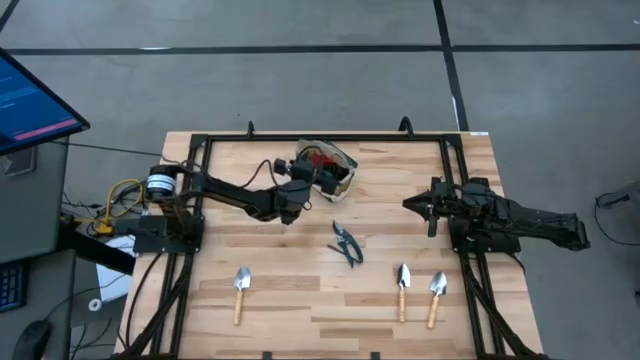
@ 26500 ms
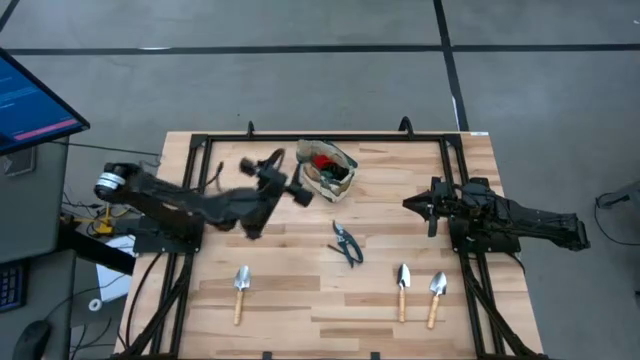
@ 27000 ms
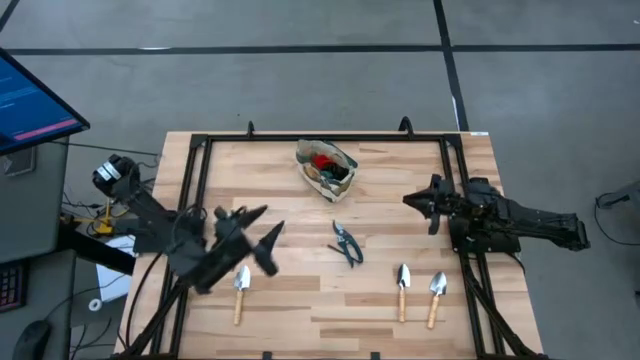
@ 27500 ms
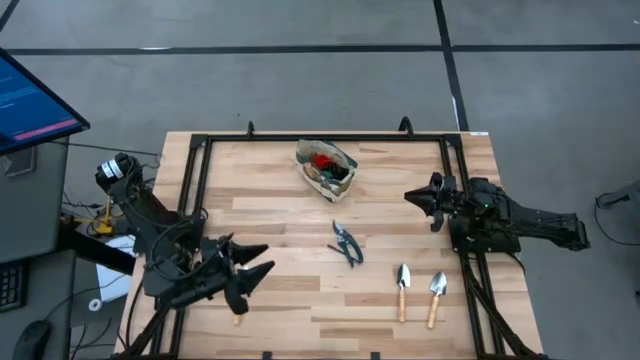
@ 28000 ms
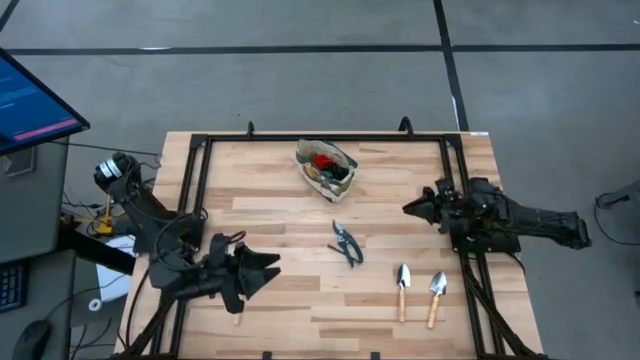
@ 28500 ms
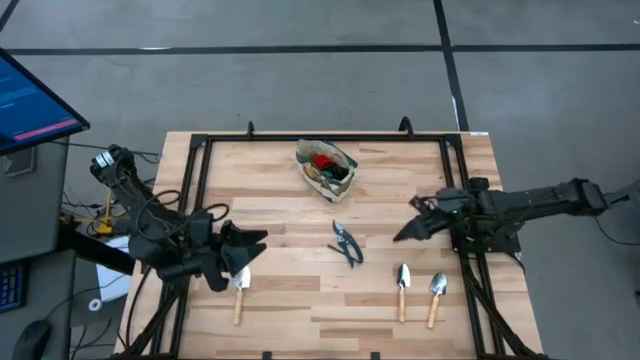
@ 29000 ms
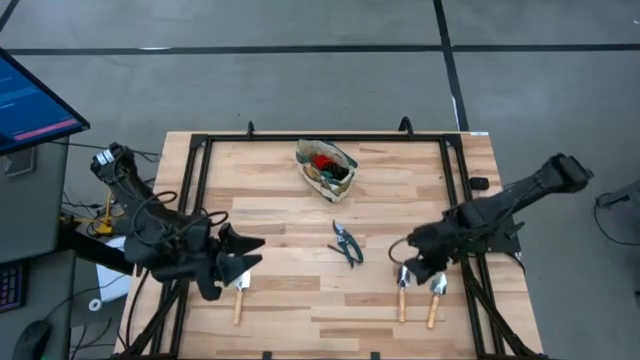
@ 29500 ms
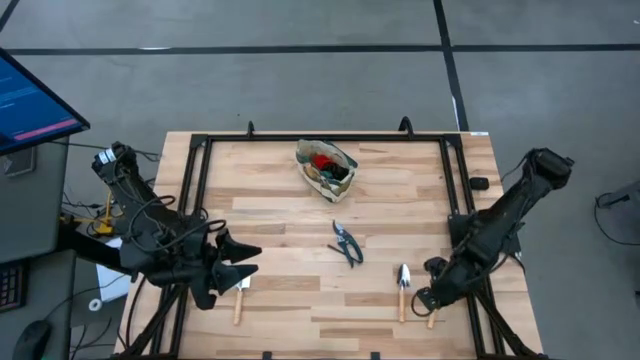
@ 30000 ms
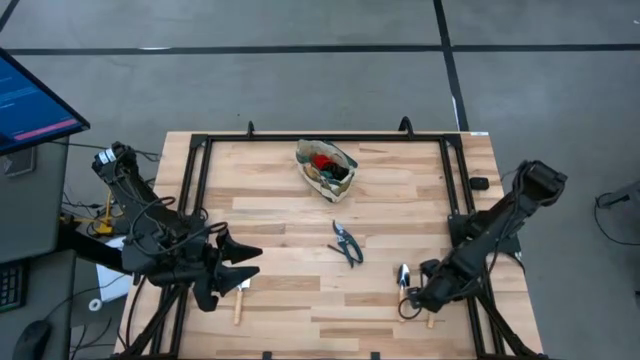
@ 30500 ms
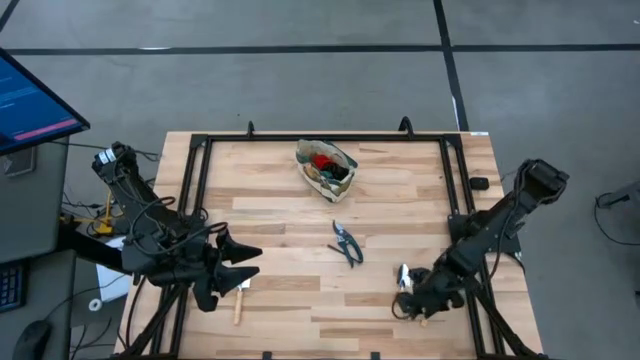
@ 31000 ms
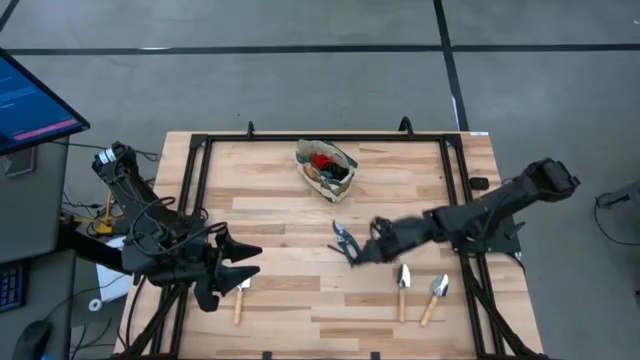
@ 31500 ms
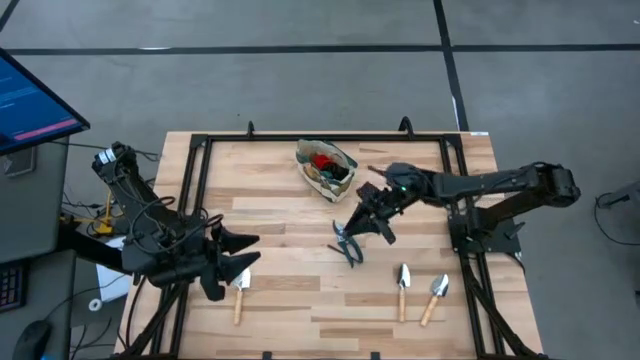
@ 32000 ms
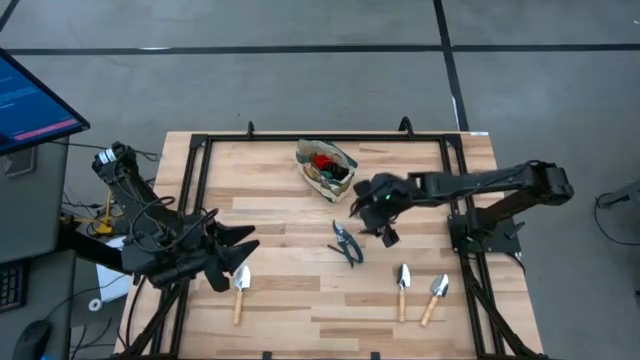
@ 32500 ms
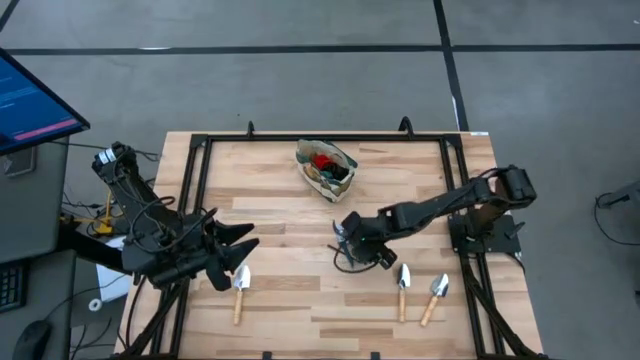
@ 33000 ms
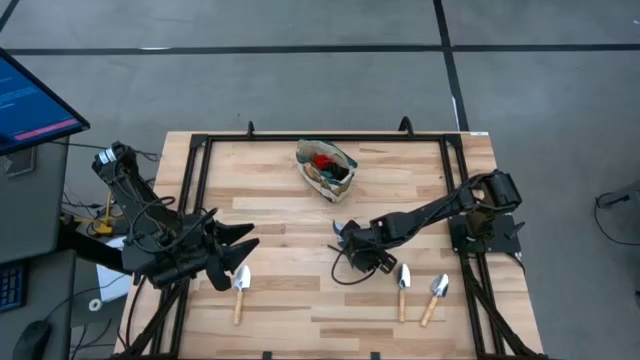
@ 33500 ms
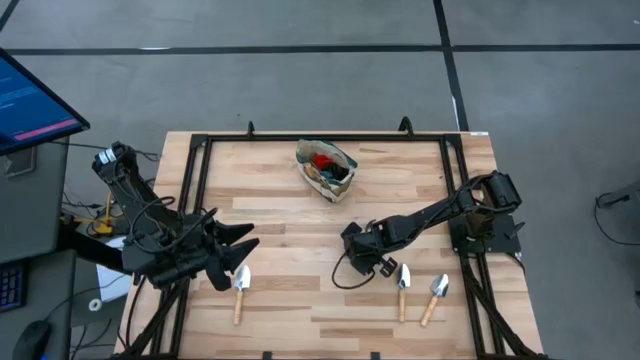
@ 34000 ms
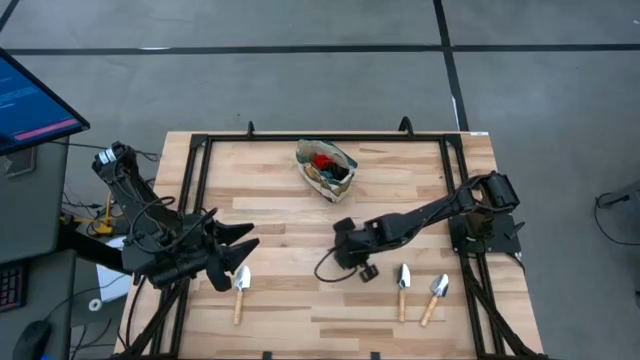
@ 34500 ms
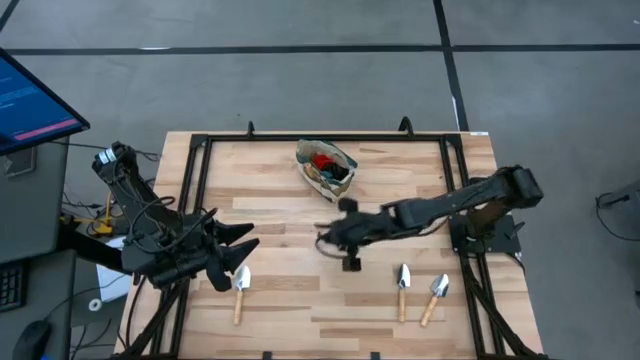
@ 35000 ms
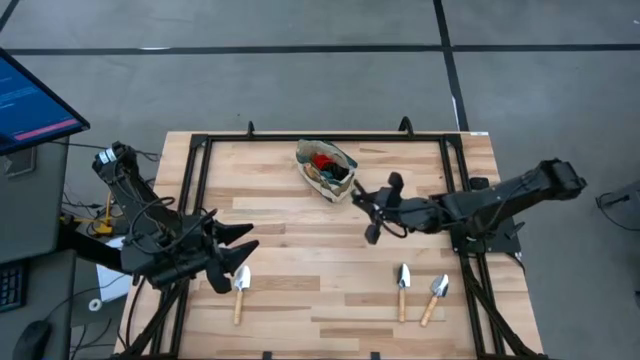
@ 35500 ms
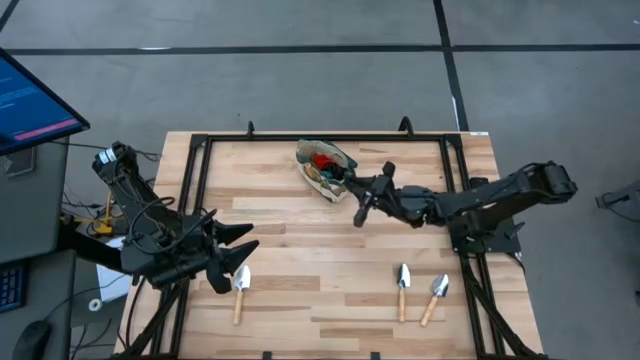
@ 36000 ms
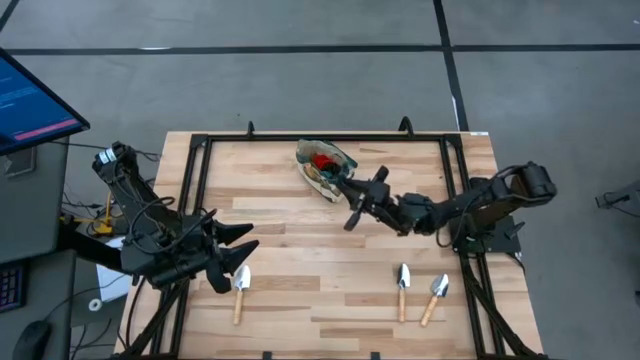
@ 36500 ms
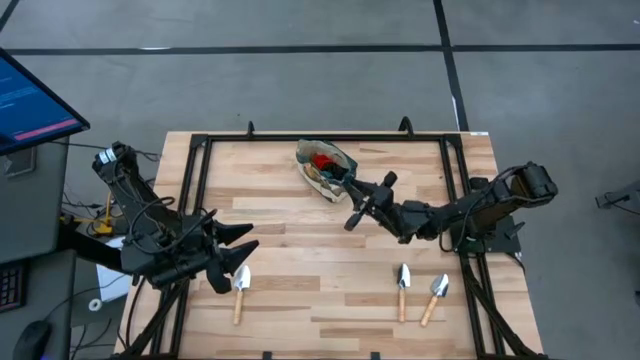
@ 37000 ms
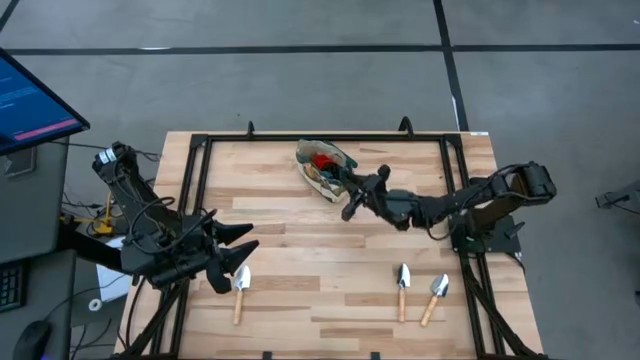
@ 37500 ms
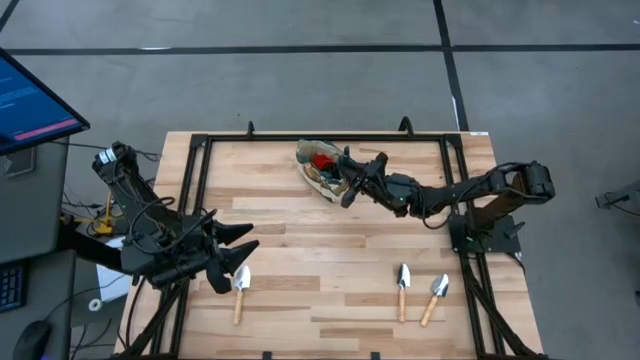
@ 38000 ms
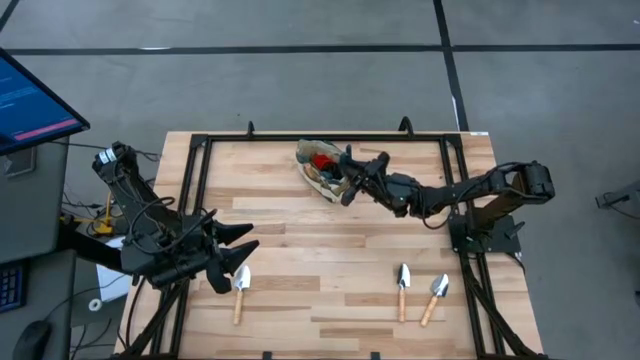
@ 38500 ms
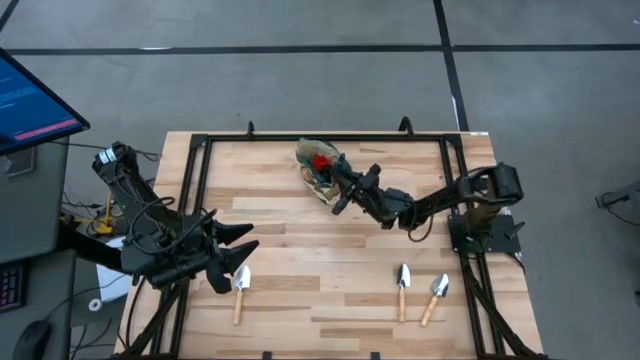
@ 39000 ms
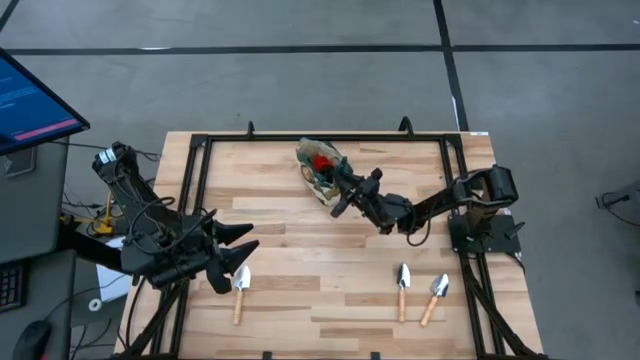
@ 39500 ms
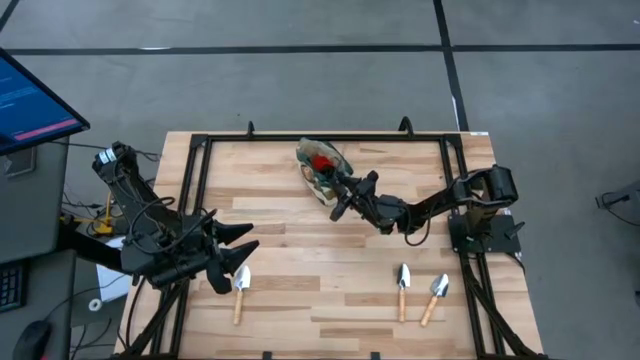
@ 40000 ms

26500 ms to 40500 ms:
Task: Pick & Place Garden tools in Gardening bag
Put the green shear scissors into the gardening bag

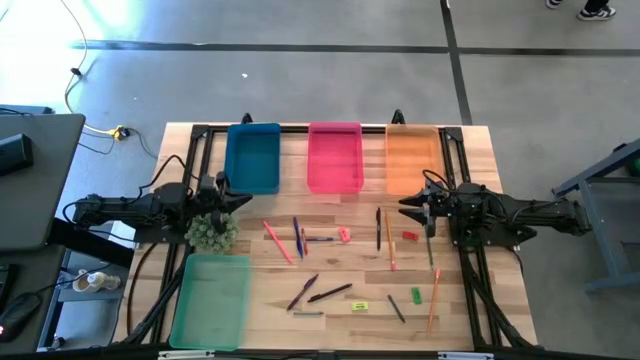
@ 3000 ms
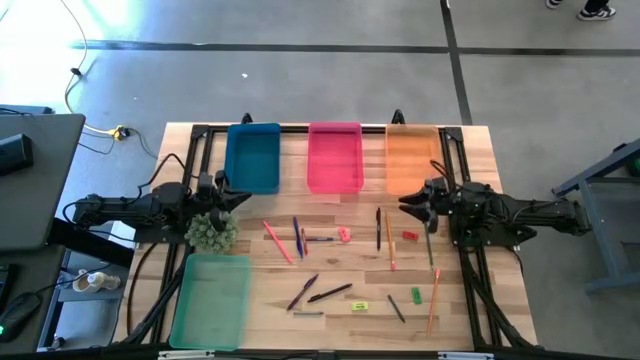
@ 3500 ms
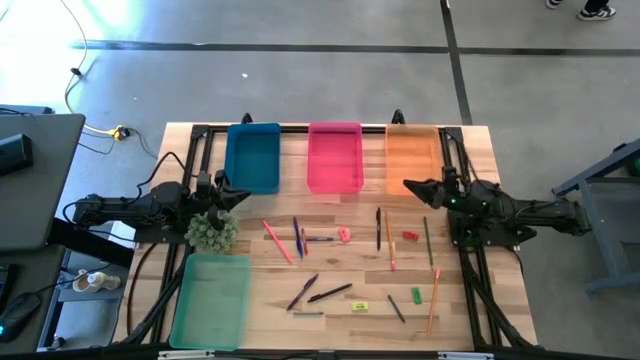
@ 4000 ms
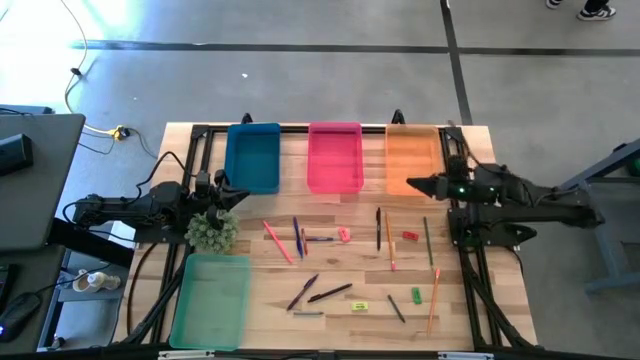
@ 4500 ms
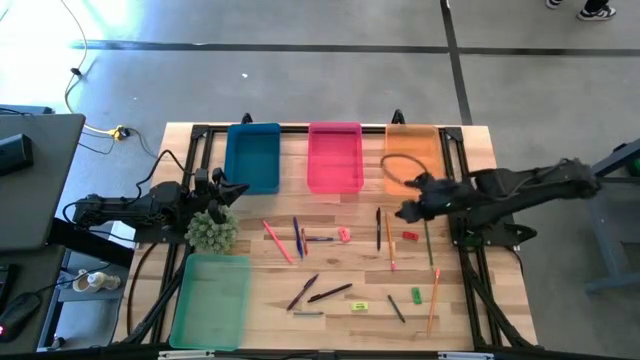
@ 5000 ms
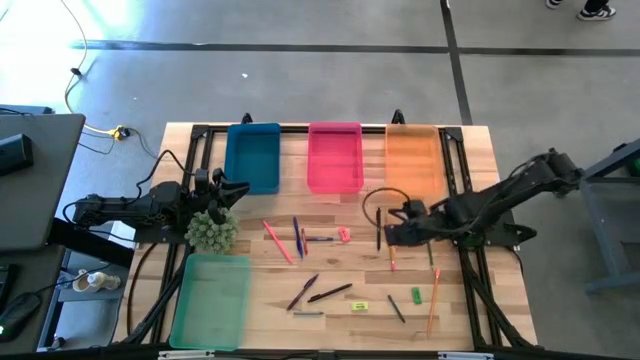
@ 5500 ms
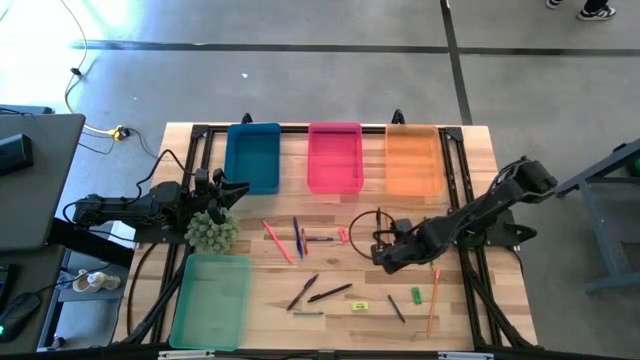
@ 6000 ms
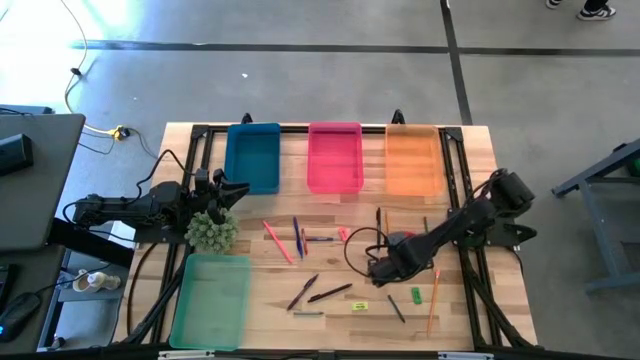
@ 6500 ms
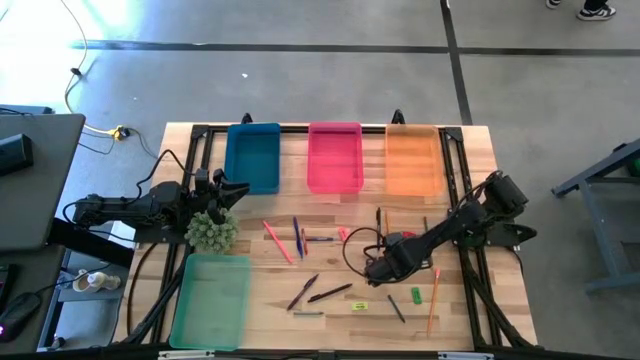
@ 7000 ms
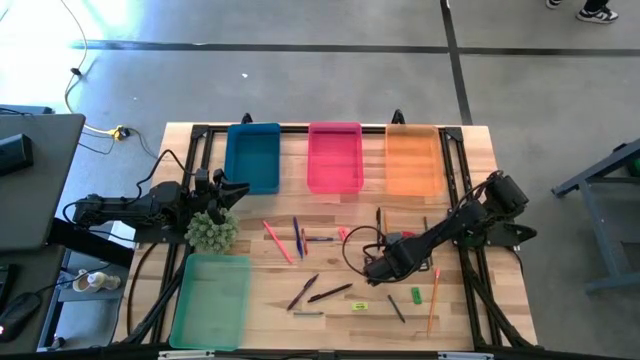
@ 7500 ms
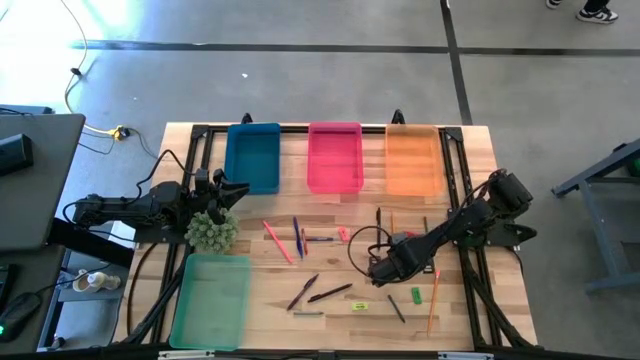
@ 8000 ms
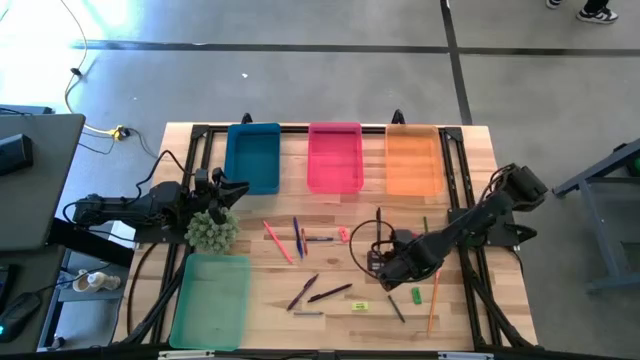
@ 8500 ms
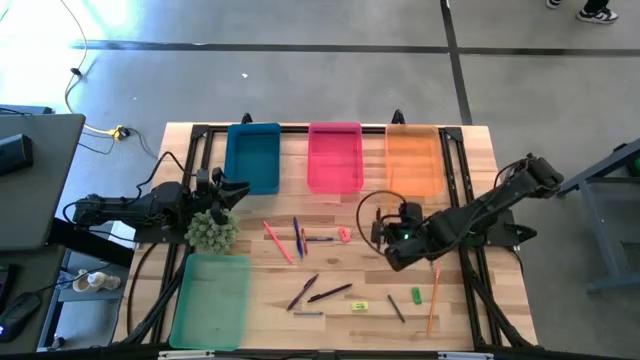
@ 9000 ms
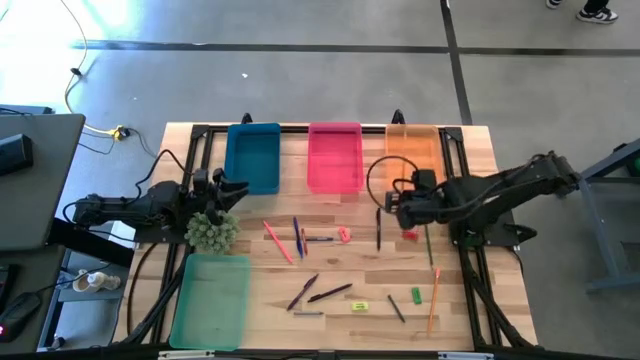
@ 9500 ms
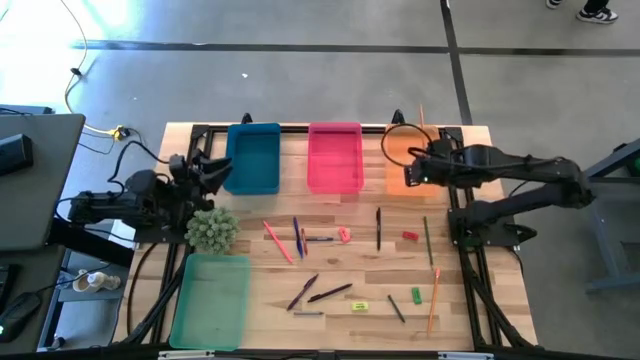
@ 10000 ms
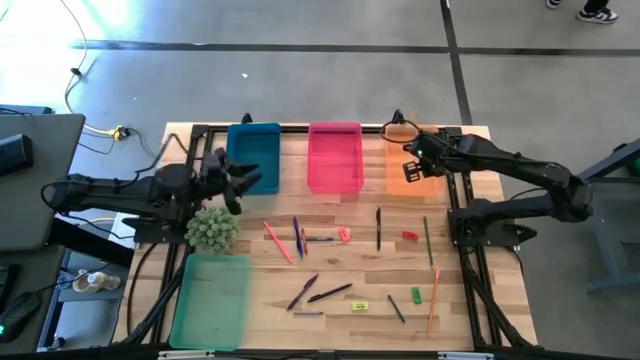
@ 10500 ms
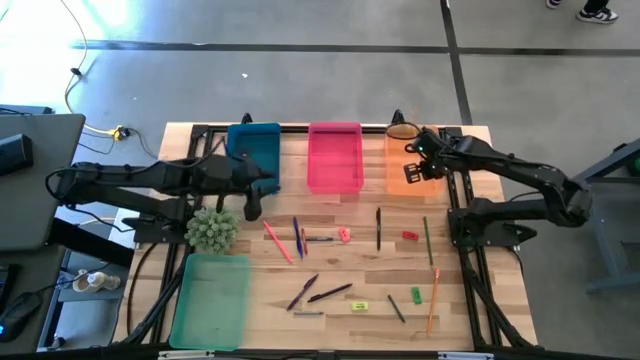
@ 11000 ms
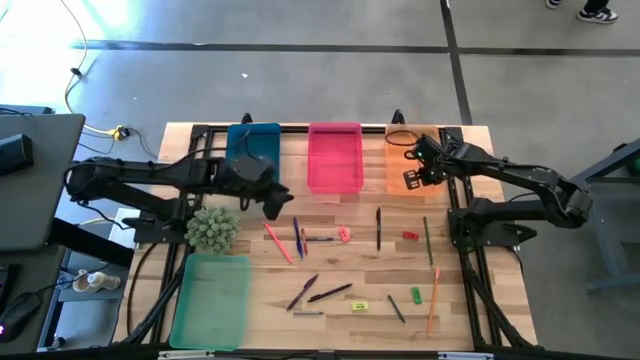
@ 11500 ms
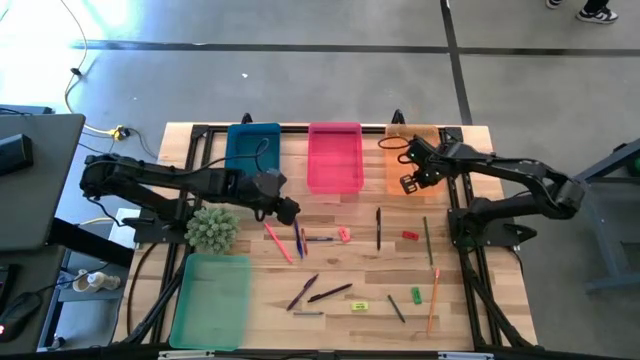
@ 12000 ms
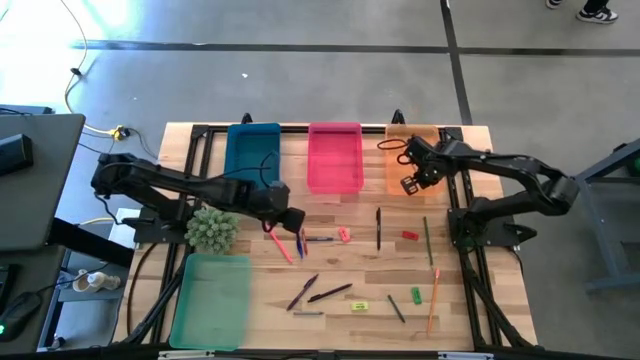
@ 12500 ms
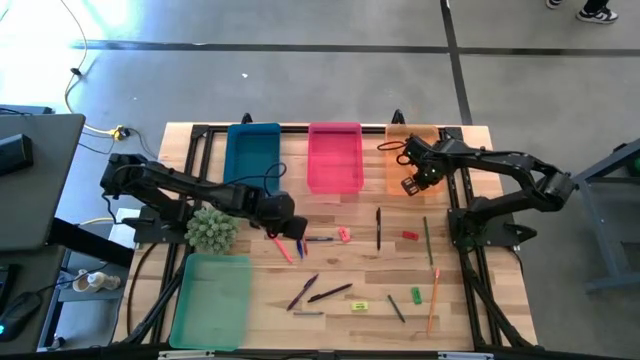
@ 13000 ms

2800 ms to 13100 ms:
Task: Sort crayons/erasers/pens/pencils in bins
Put the top yellow pencil into the orange bin
